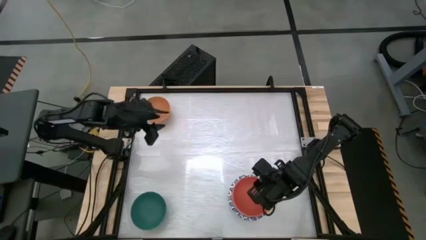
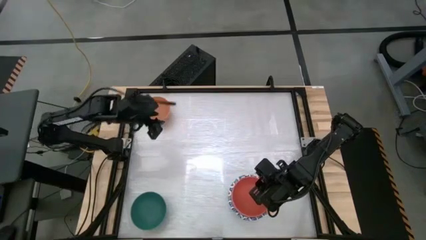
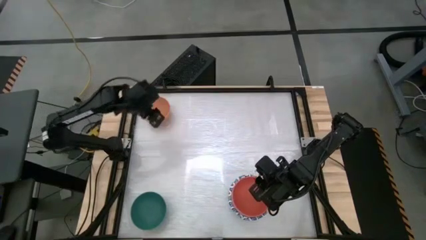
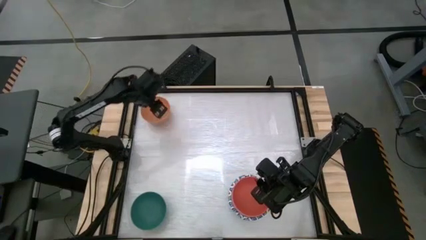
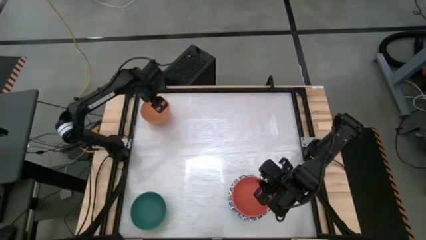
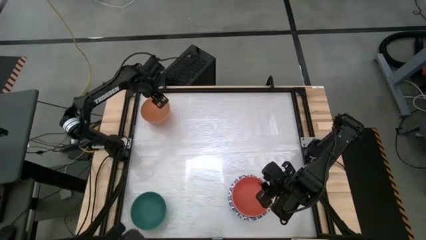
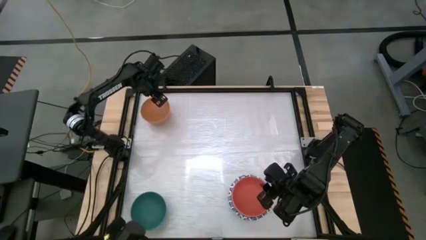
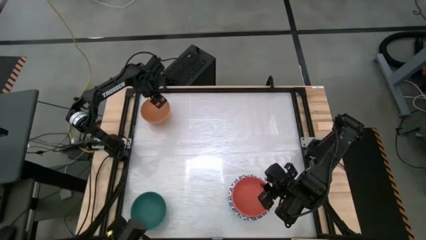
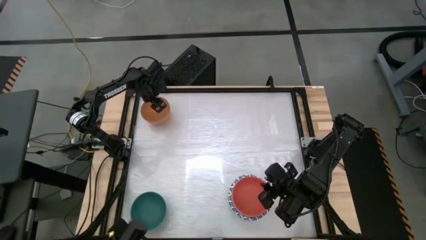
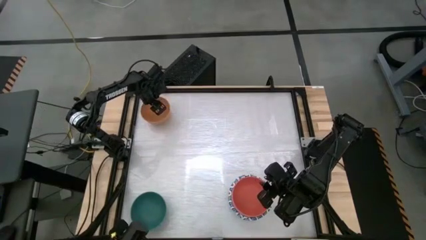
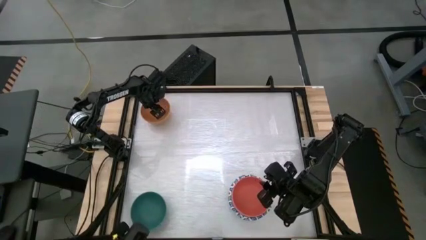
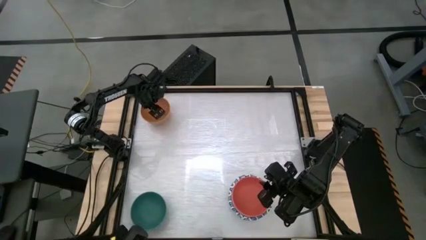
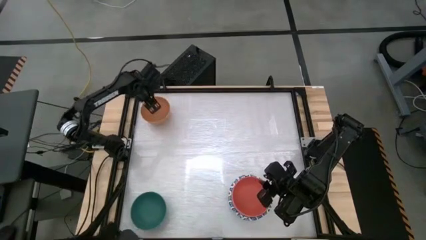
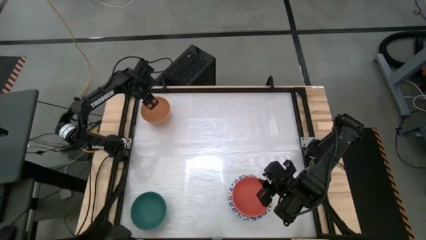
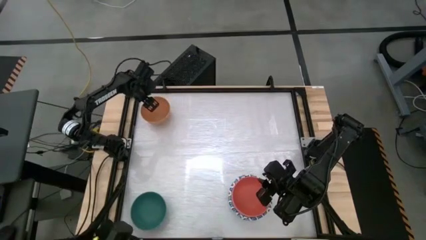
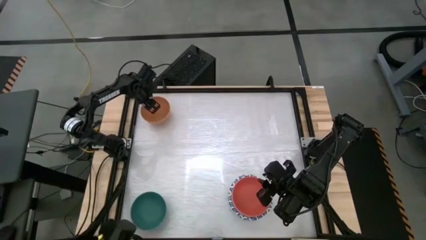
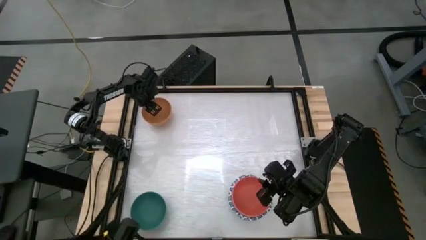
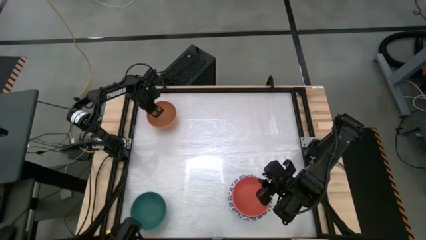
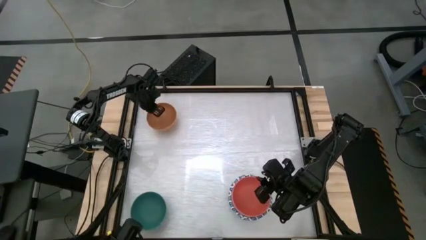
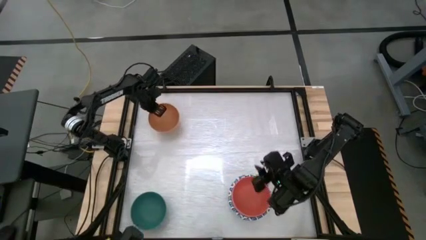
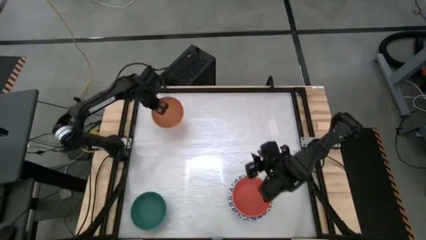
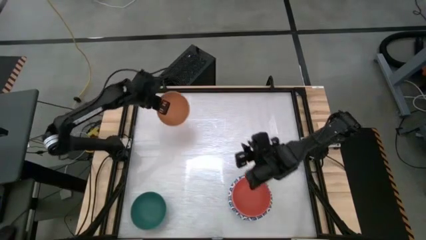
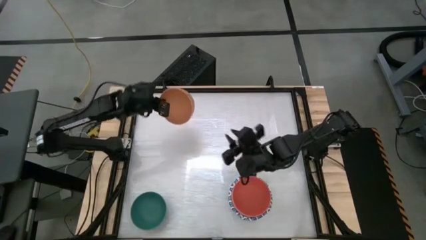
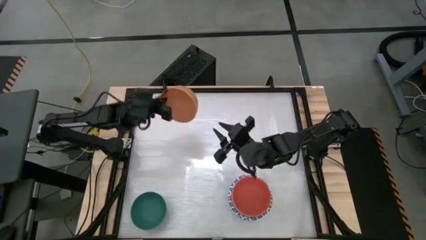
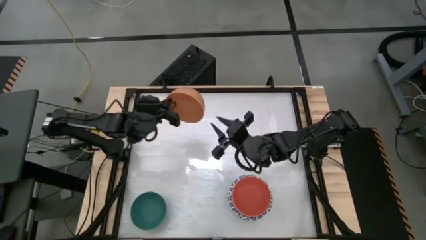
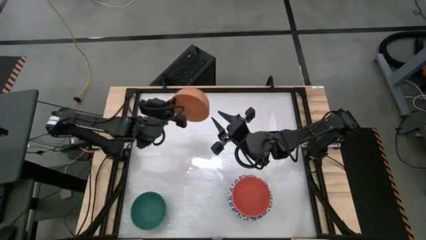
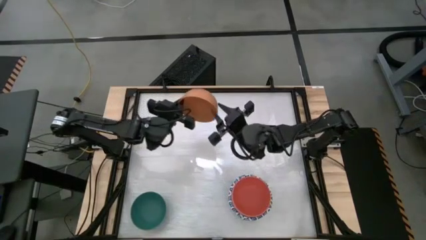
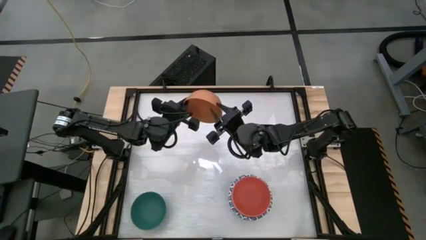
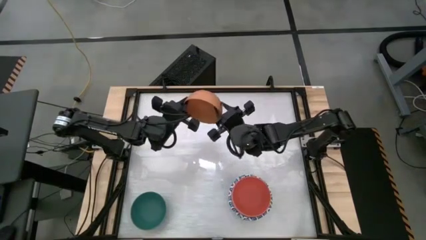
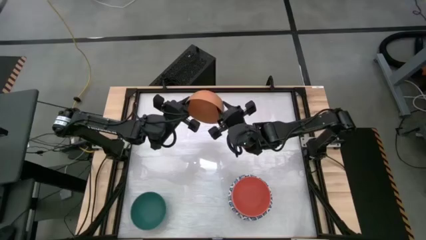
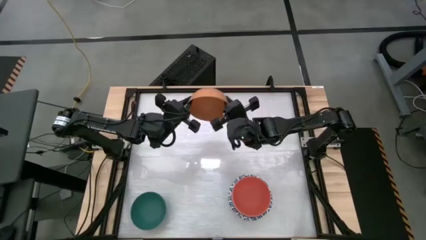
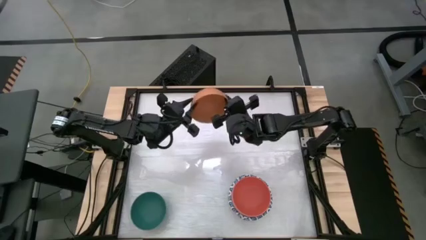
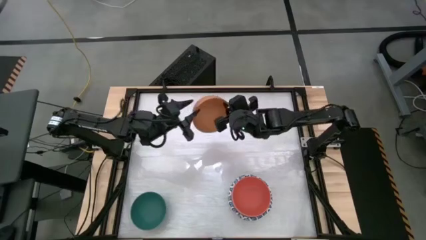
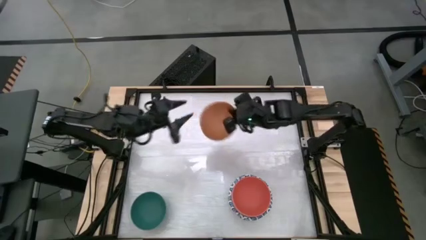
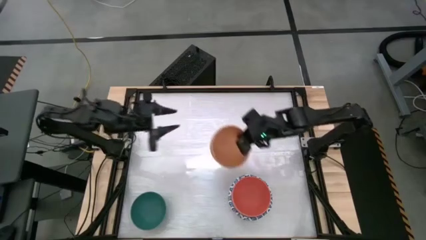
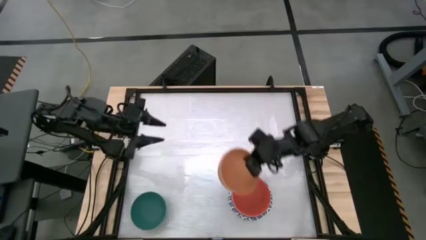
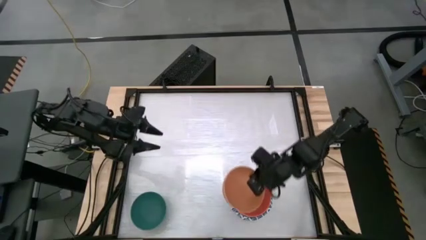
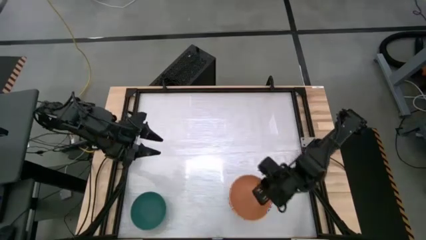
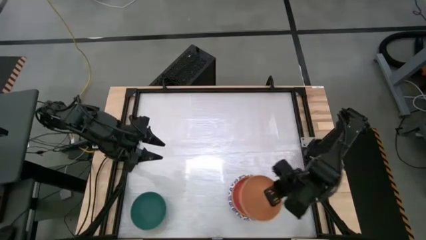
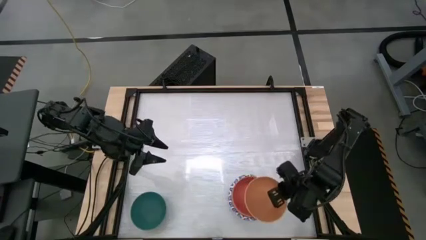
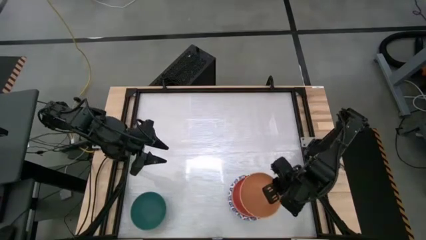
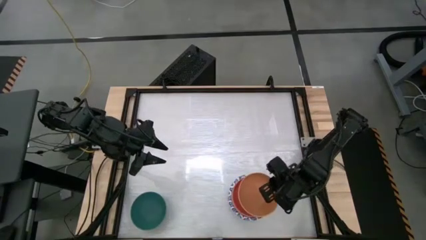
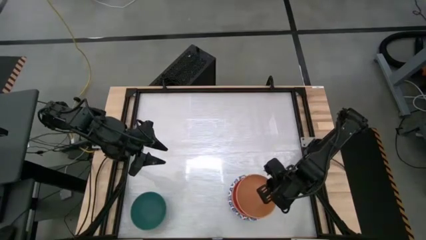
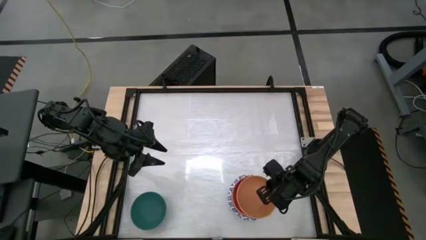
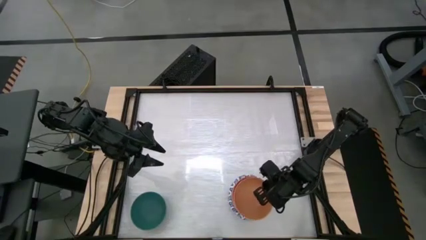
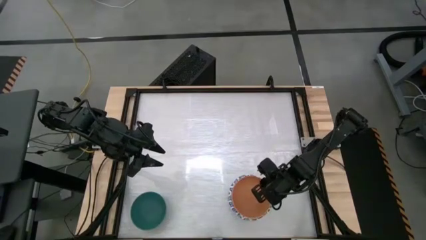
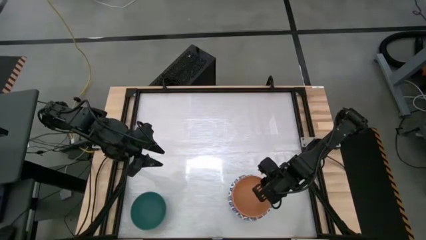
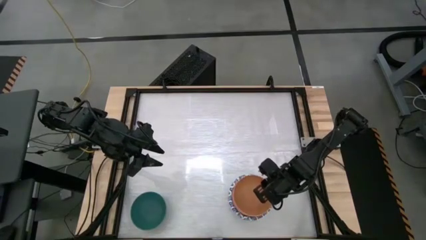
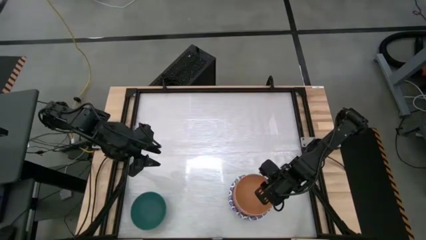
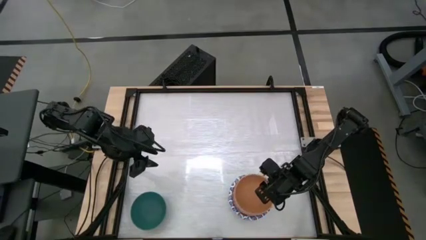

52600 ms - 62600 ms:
Stack the light orange bowl on top of the orange bowl

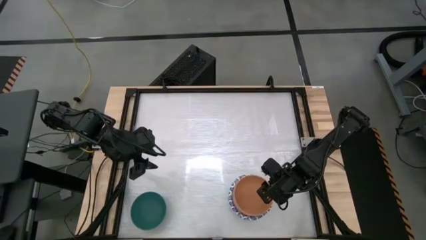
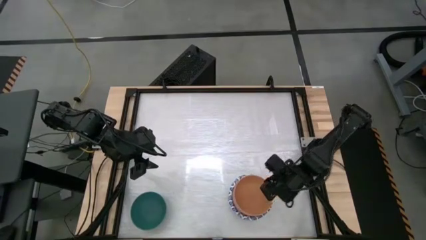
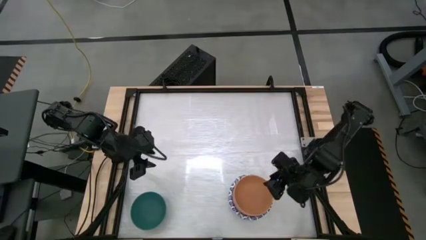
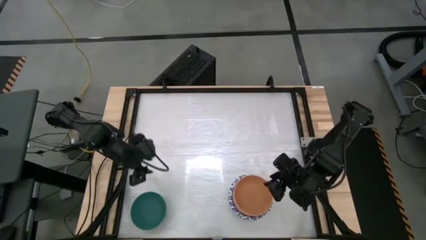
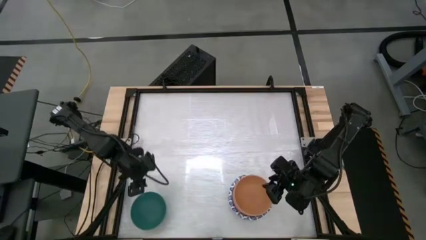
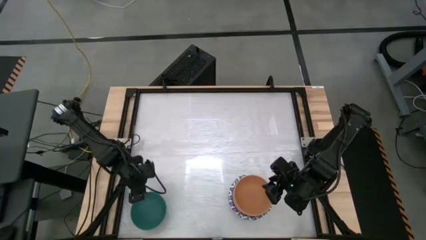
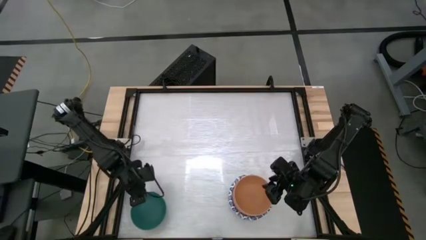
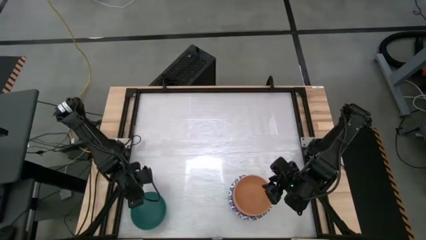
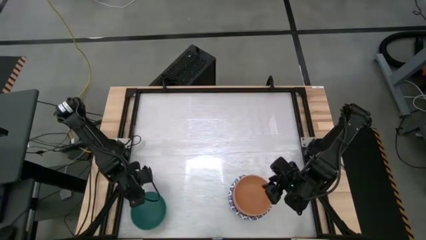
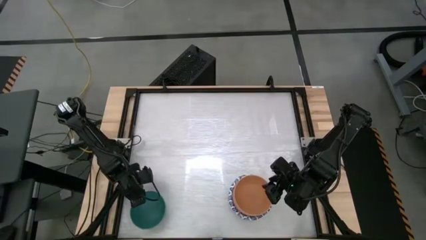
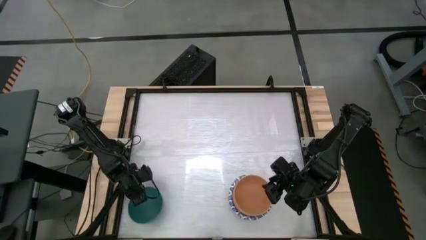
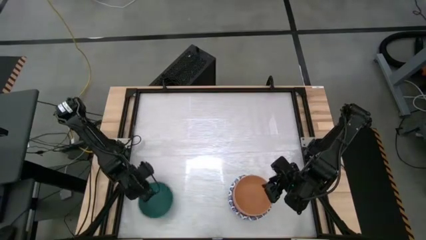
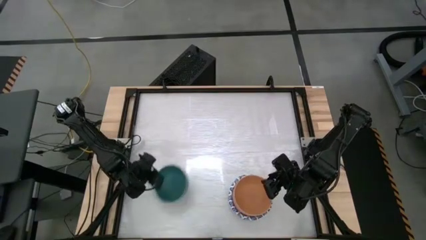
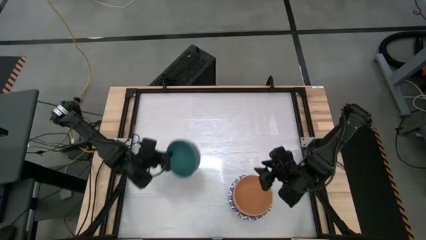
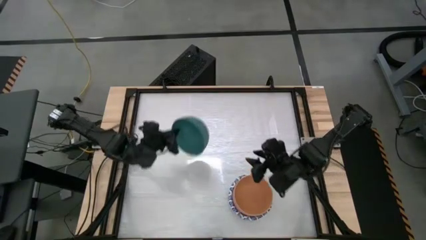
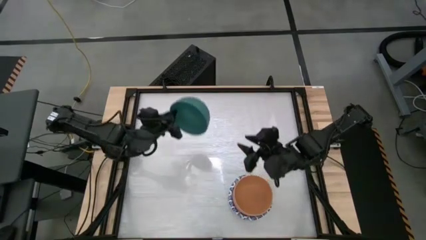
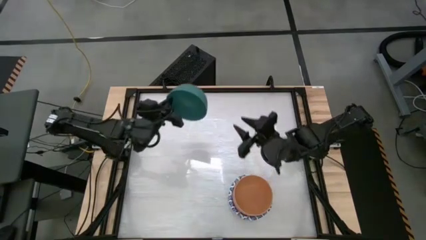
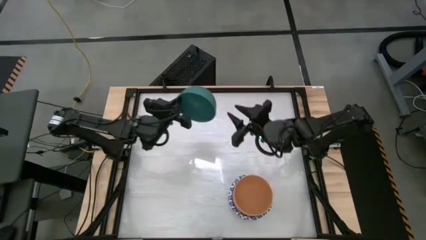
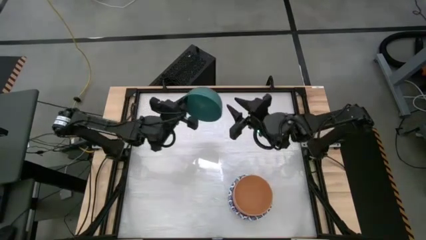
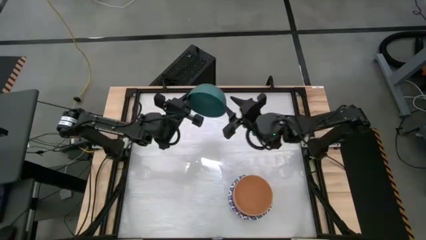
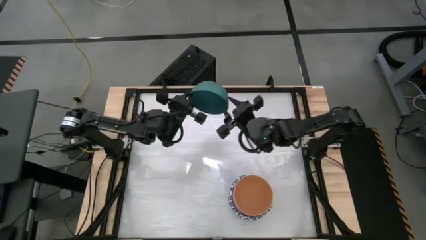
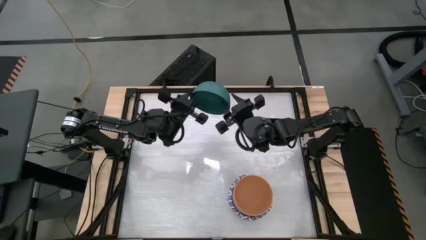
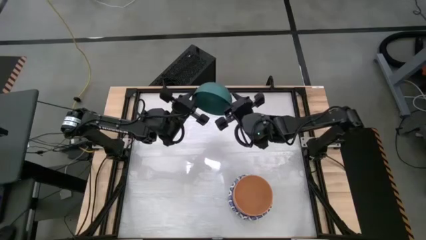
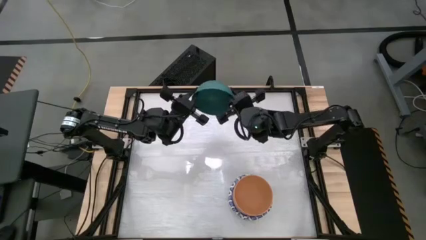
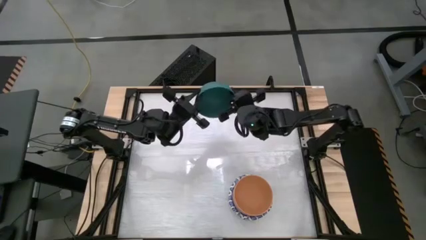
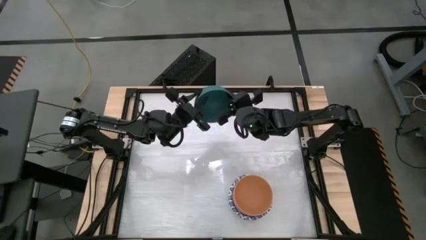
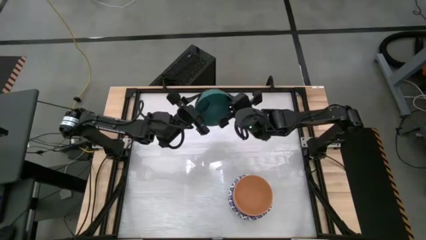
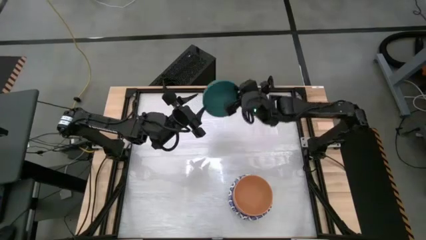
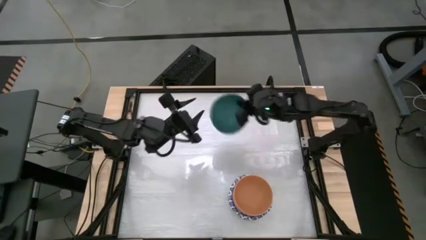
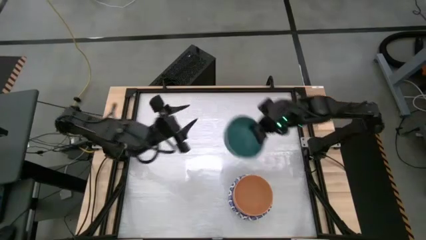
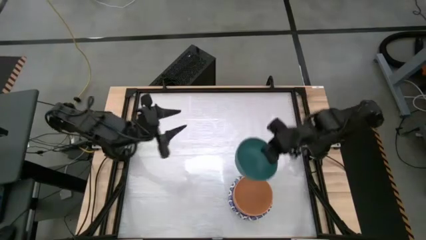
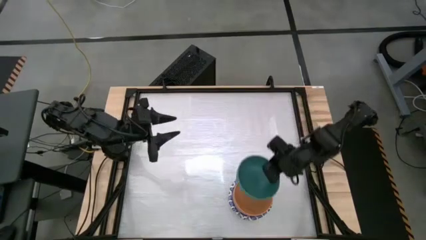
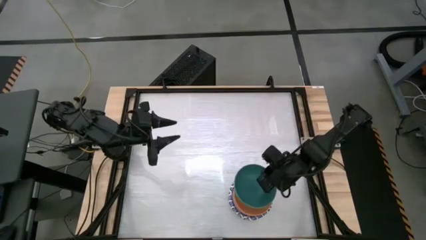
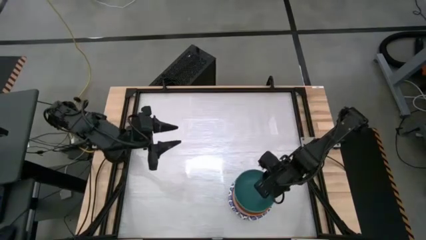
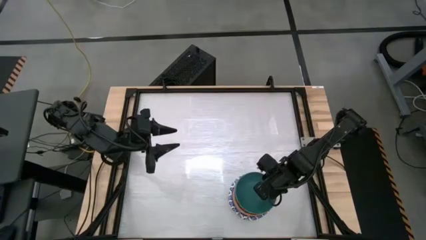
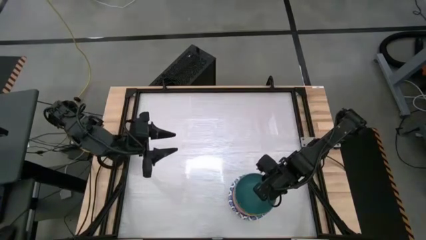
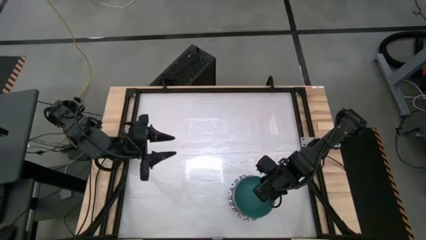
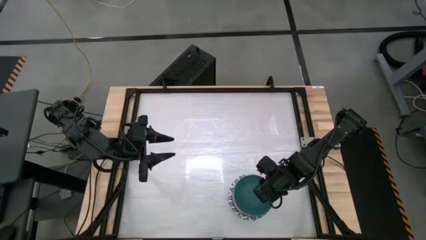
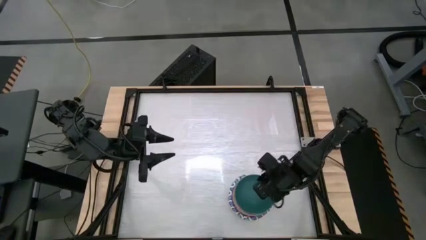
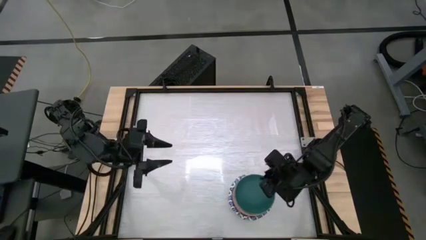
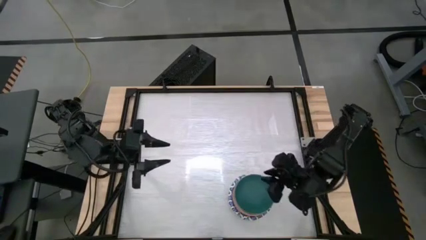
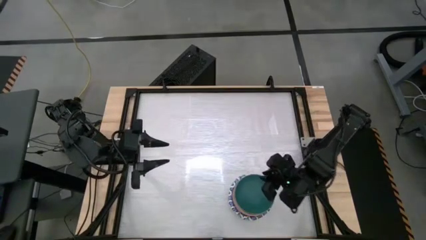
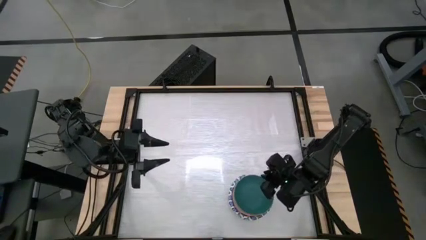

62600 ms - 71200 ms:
Stack the green bowl on top of the light orange bowl
